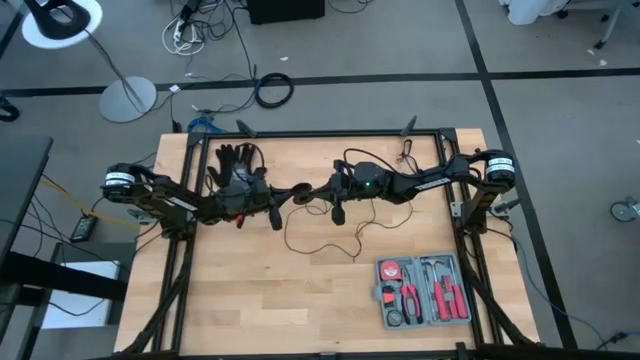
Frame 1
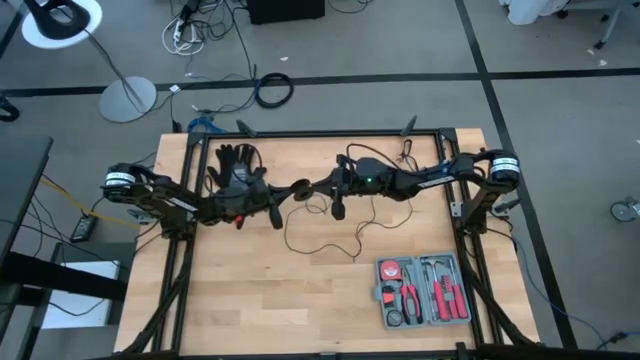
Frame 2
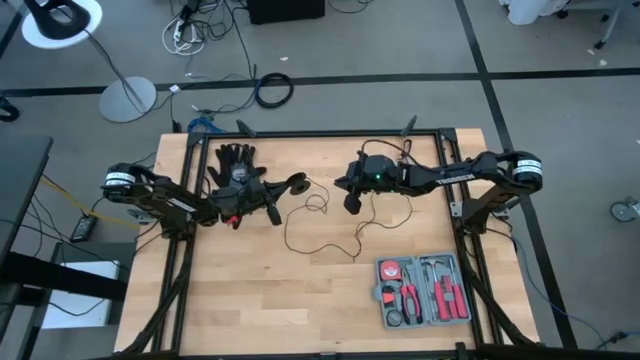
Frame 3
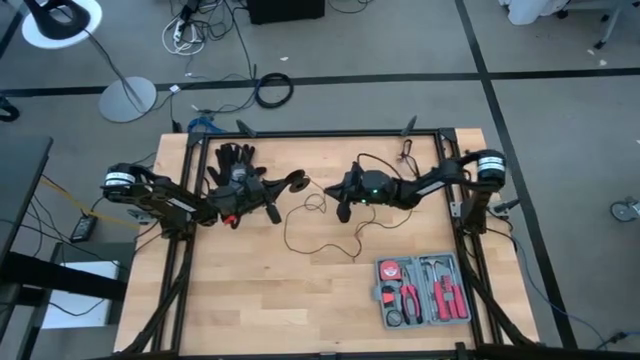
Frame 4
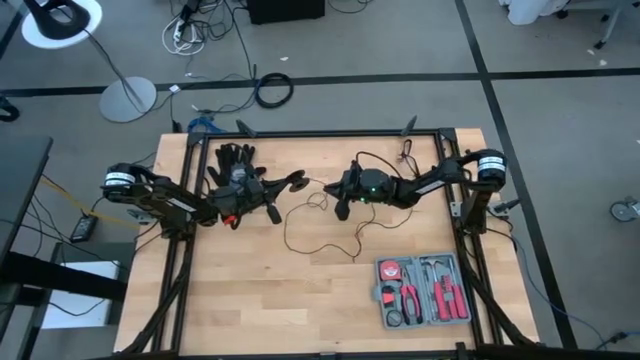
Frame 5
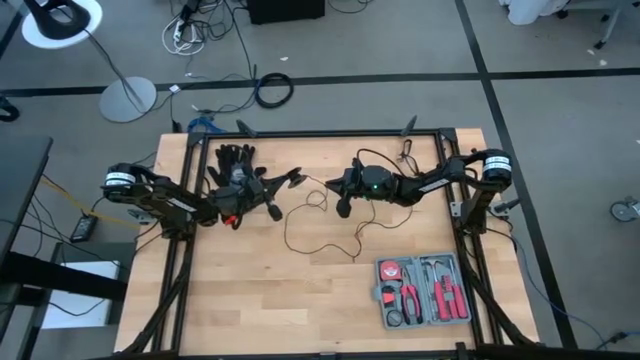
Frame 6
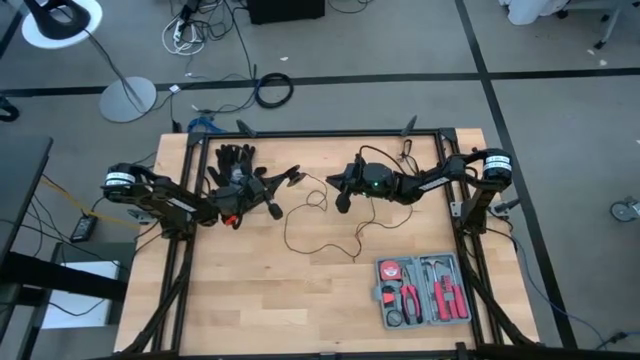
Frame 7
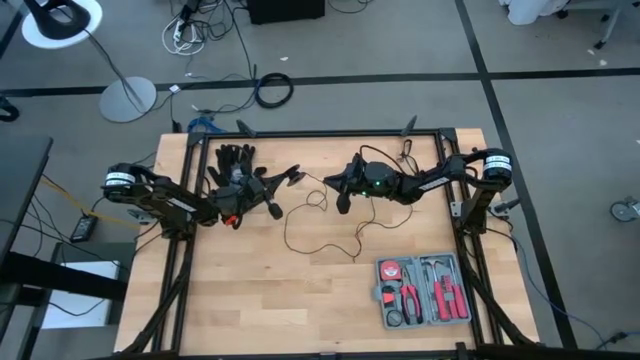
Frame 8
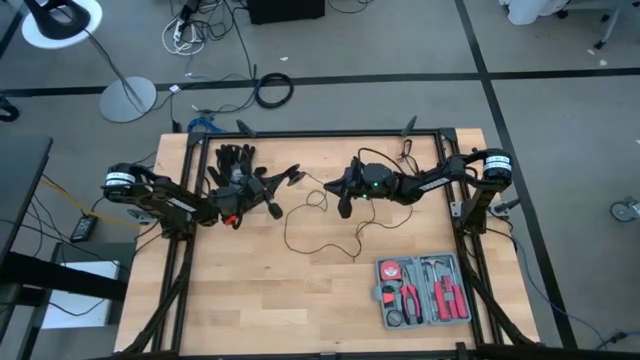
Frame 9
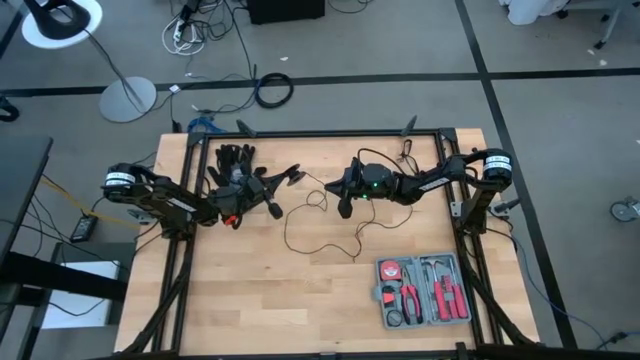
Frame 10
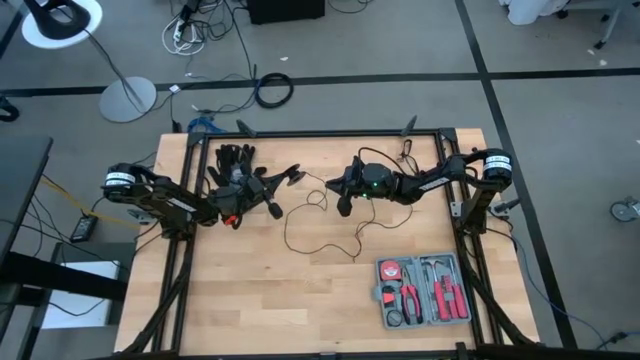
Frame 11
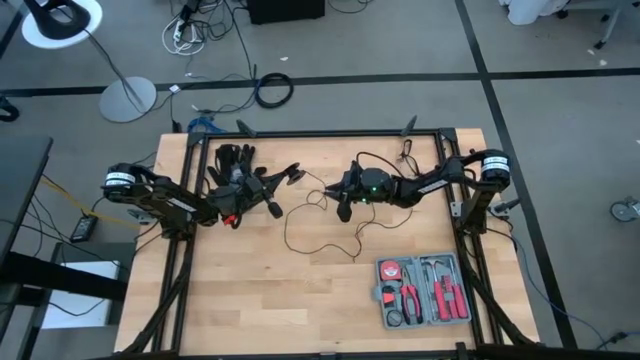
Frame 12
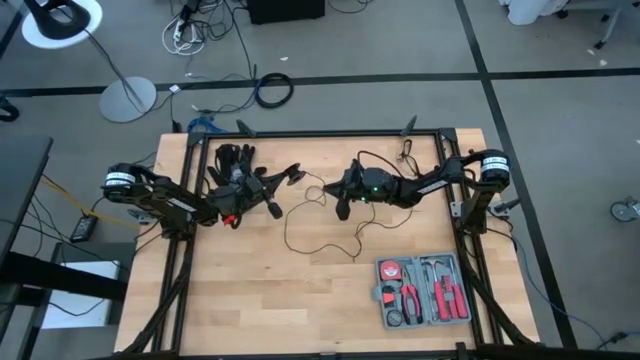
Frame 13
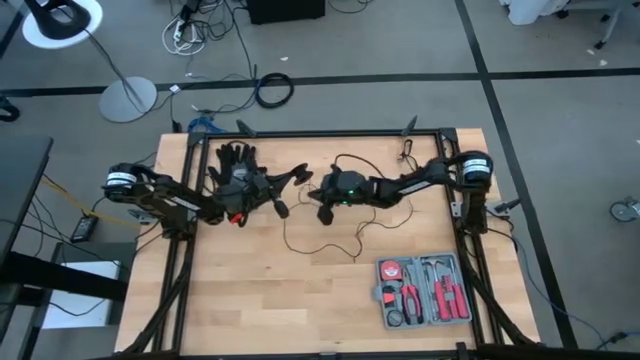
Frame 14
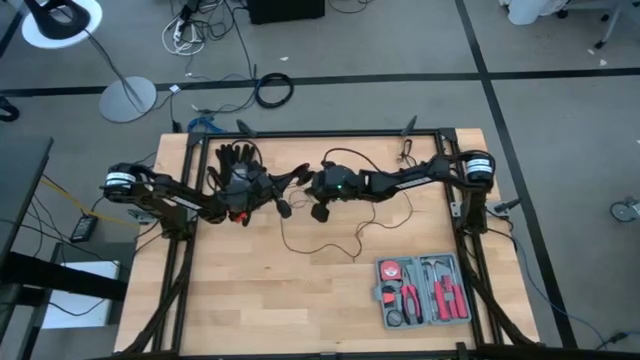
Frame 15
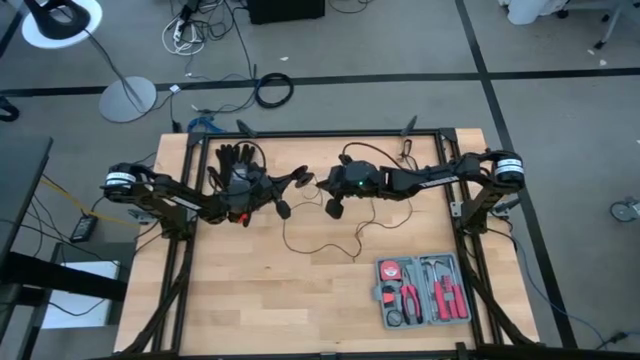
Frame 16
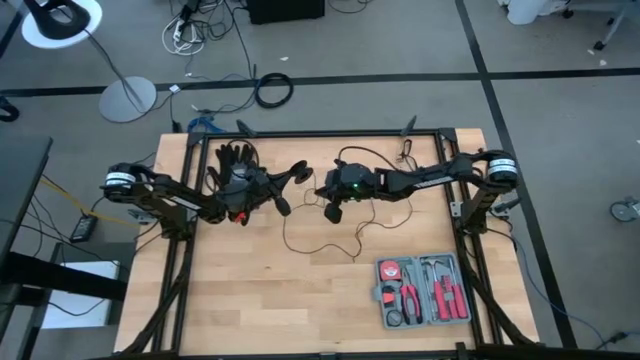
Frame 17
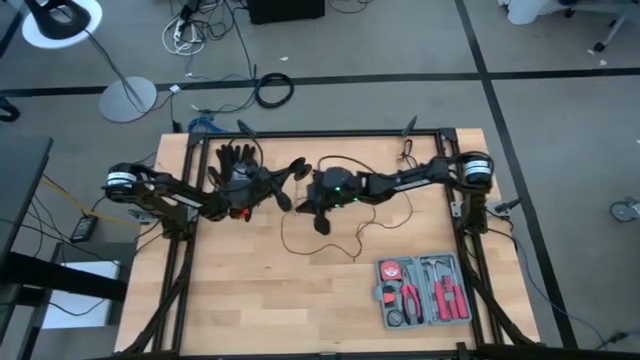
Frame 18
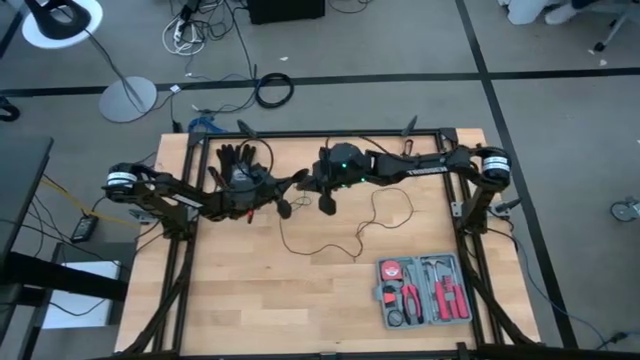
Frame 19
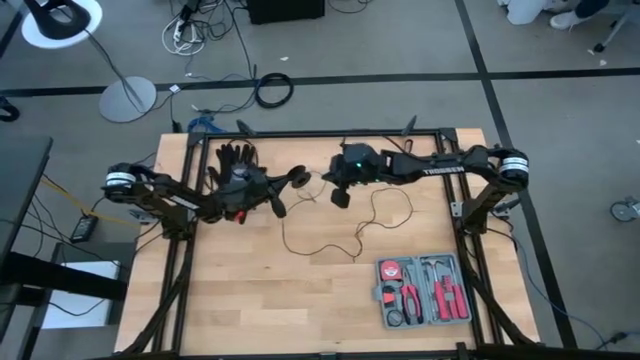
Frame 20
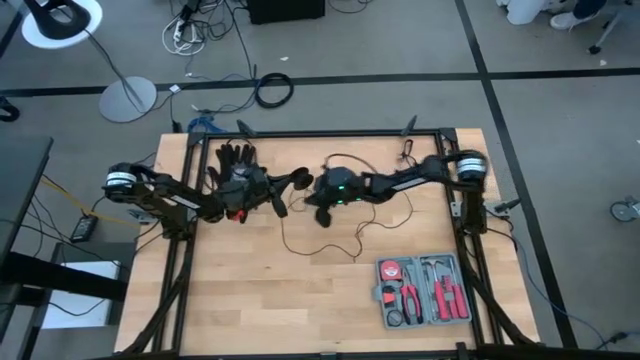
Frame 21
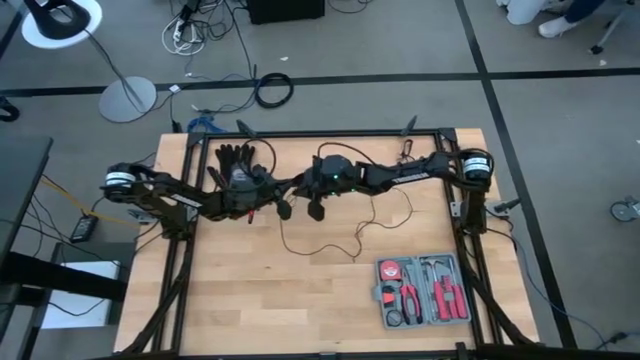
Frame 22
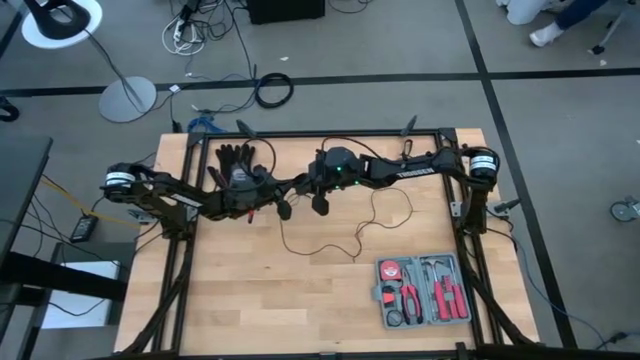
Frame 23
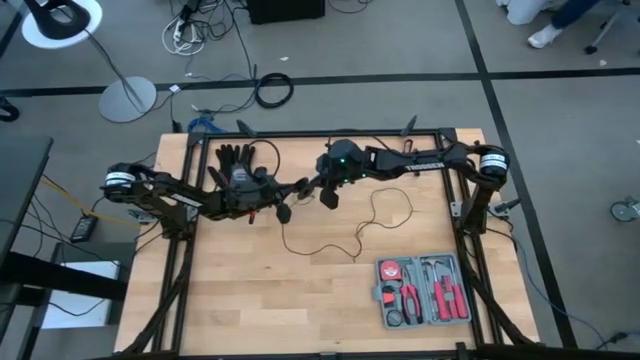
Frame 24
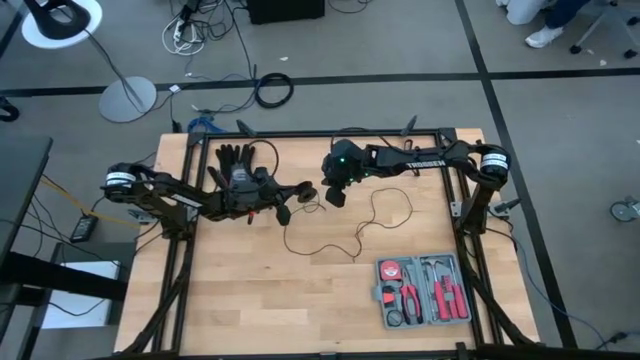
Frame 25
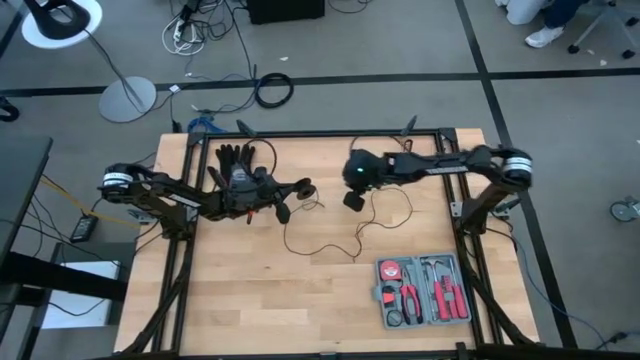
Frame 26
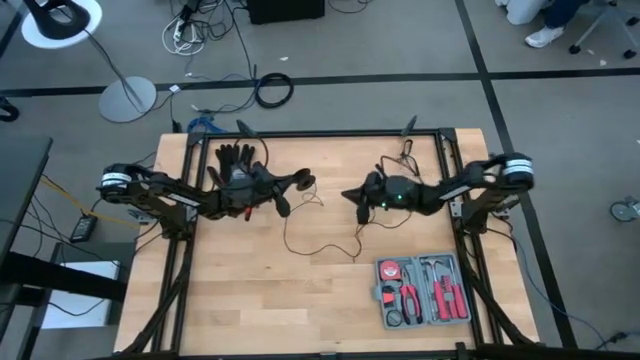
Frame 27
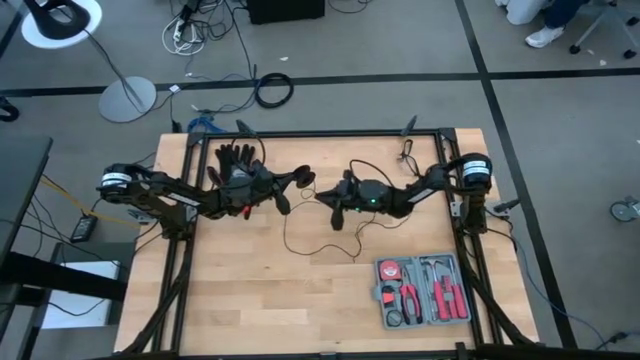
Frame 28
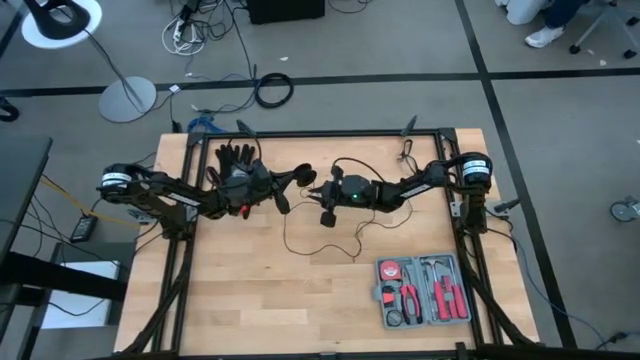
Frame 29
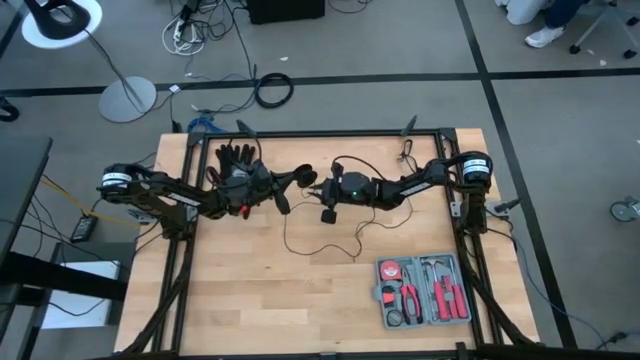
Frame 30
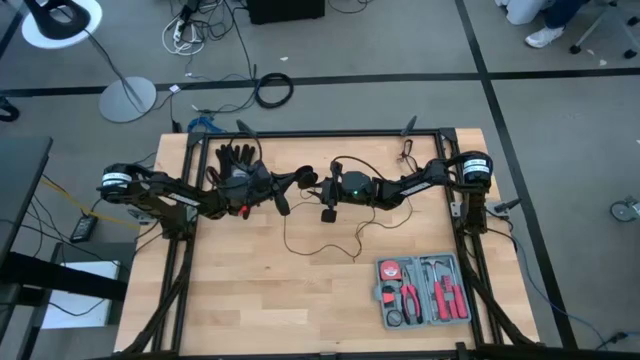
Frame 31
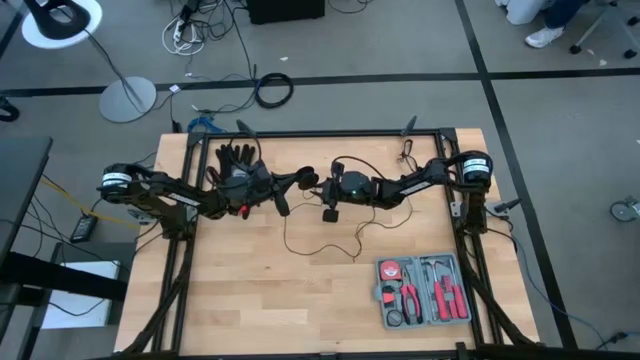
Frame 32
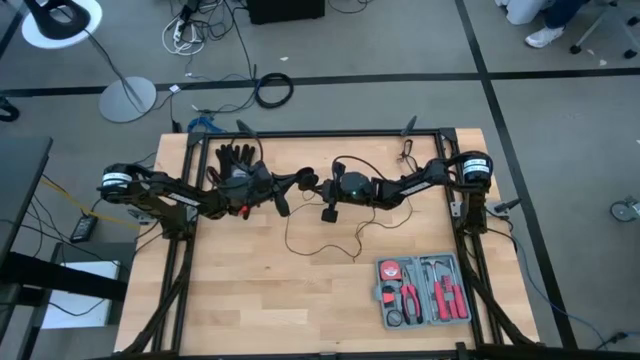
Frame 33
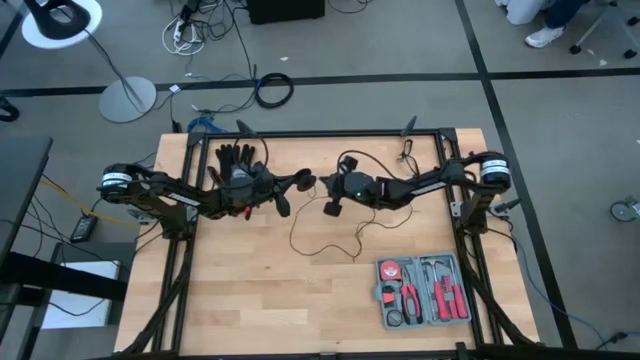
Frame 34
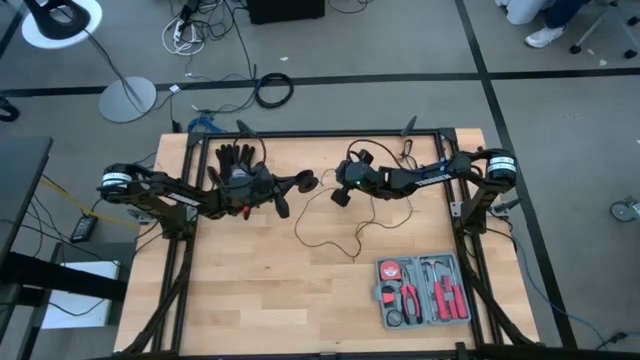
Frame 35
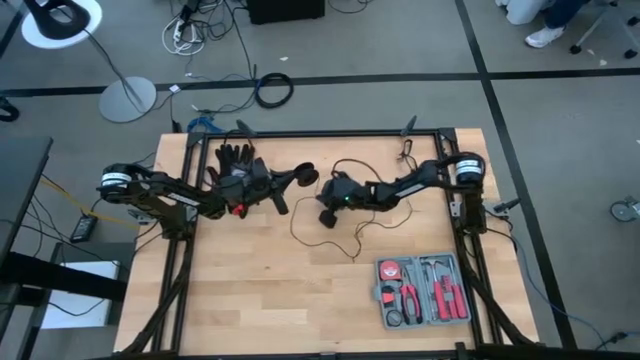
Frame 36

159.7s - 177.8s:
Task: Coil cords
Coil the black wire

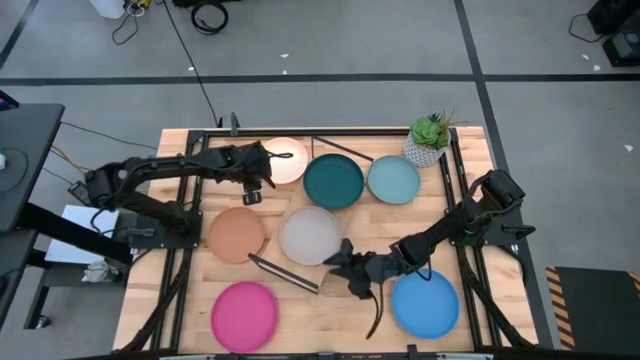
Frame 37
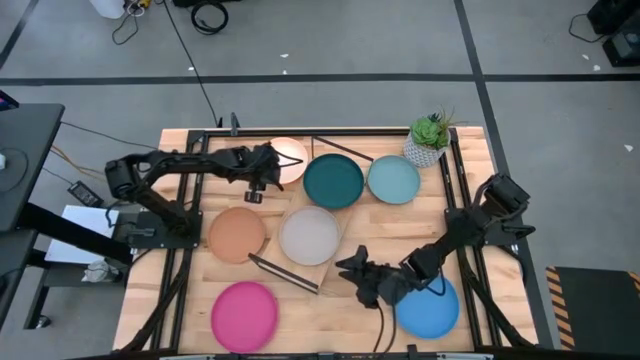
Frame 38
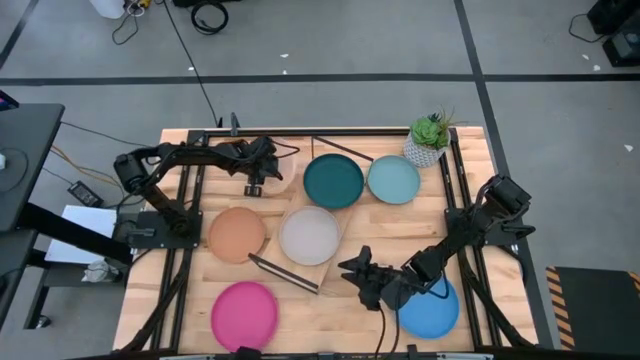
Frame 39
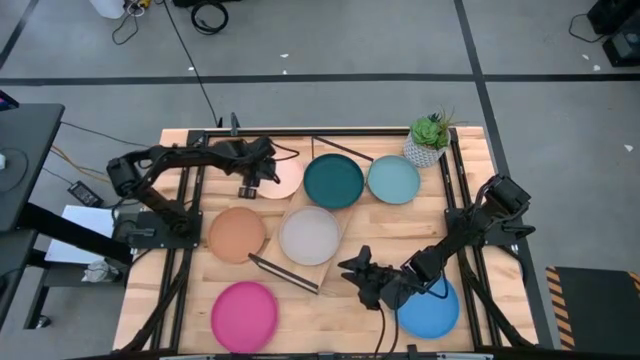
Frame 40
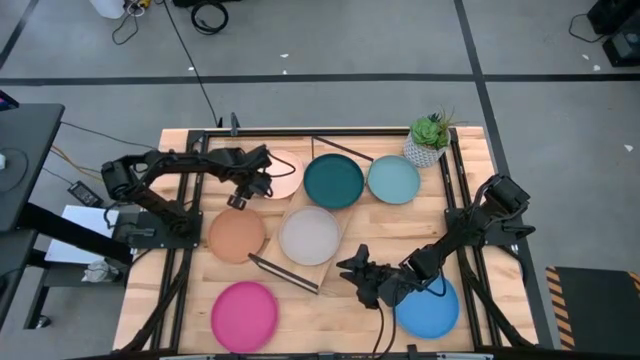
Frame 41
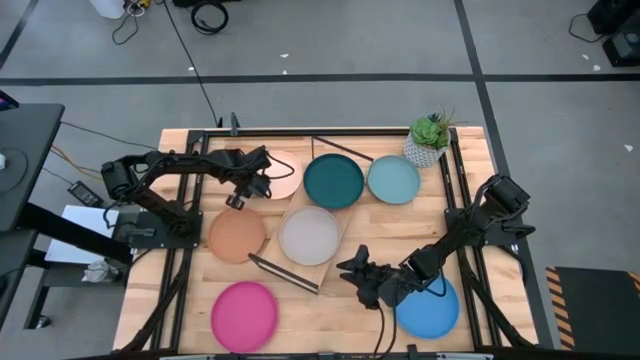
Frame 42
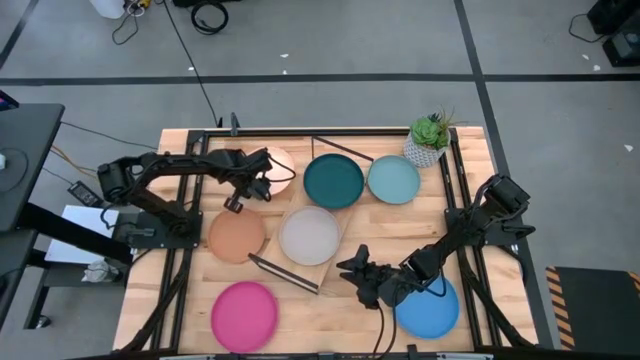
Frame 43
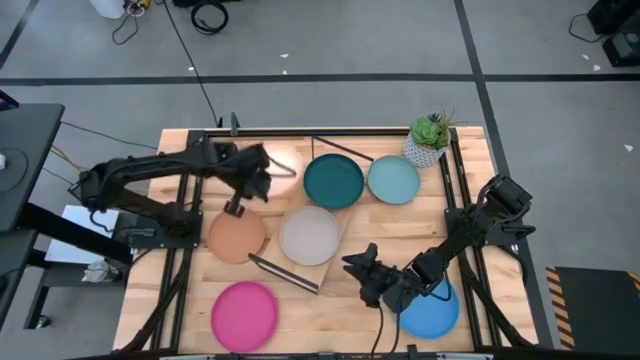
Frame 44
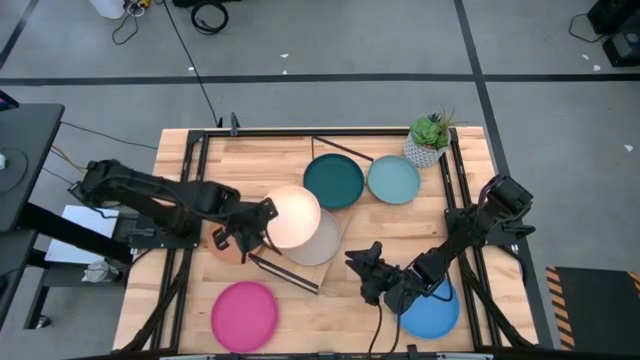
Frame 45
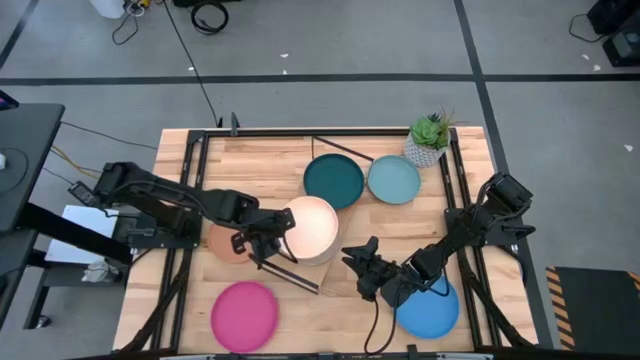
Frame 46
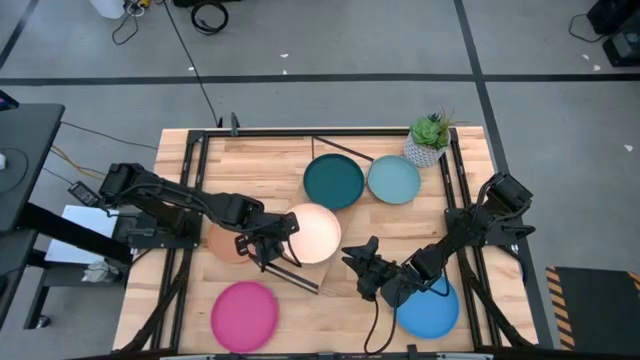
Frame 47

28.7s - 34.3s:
Task: Place and stack plates onto a shelf
Stack the light orange plate on the white plate
